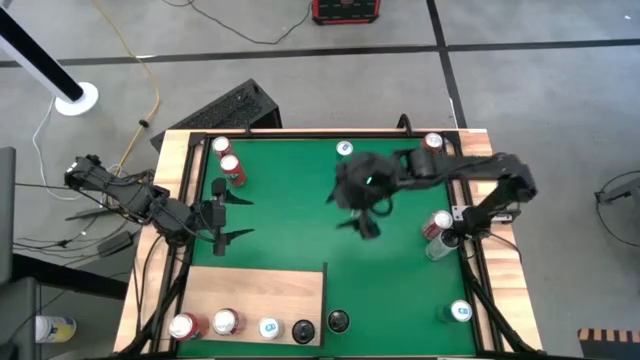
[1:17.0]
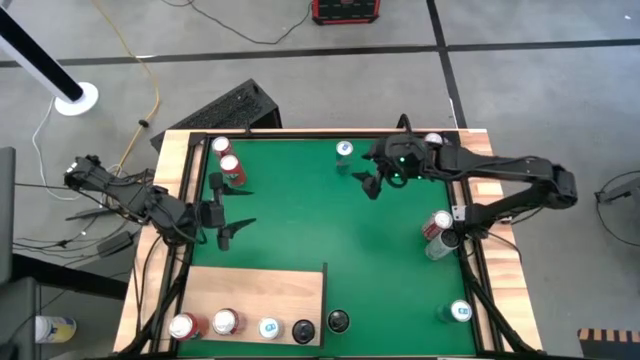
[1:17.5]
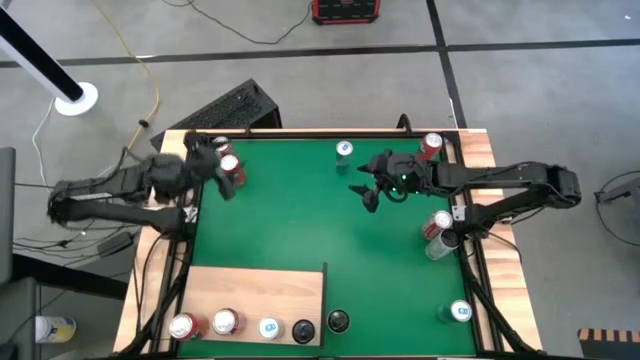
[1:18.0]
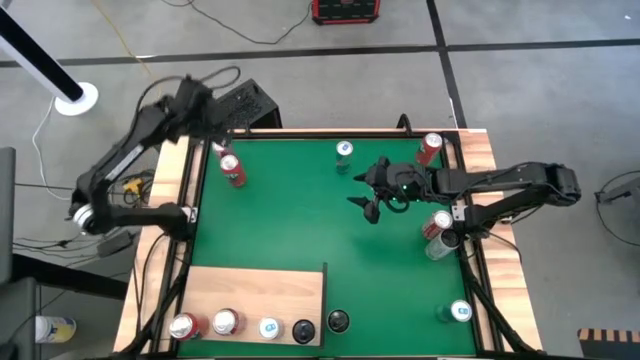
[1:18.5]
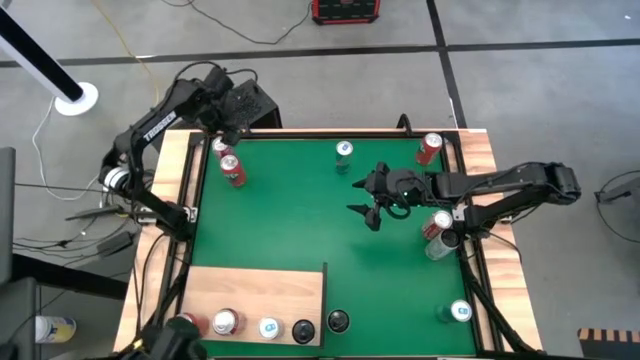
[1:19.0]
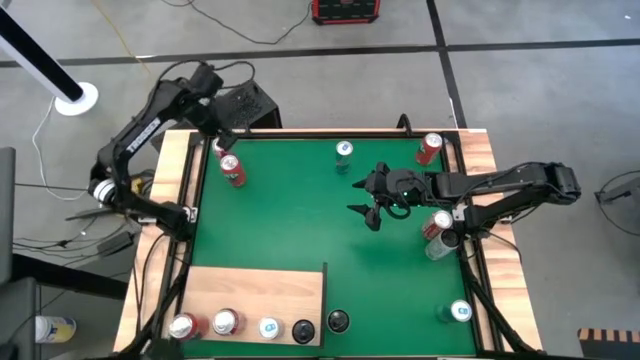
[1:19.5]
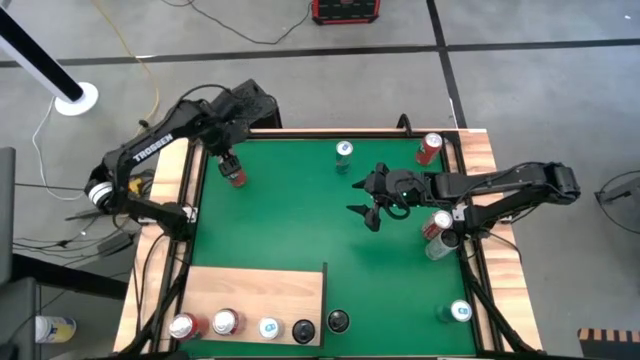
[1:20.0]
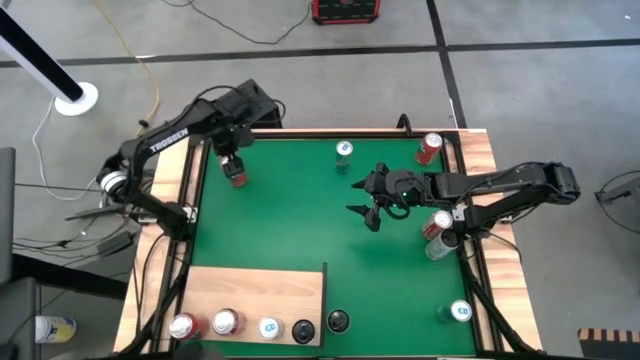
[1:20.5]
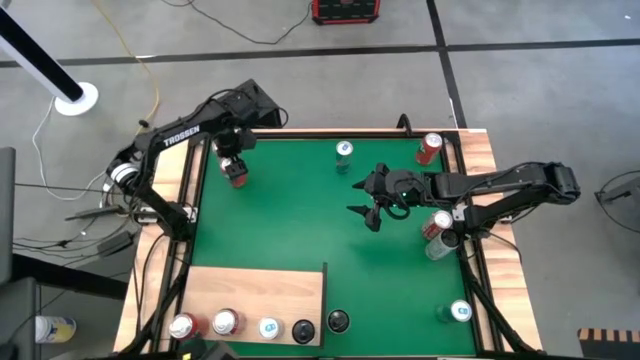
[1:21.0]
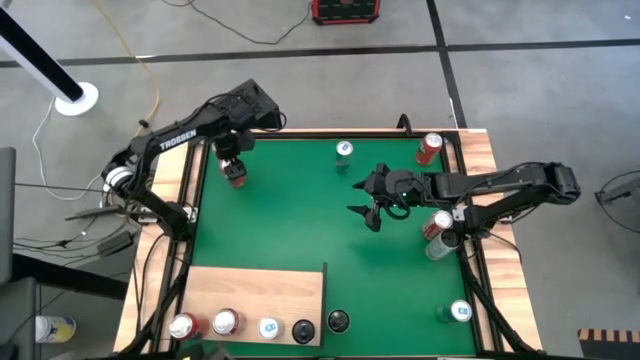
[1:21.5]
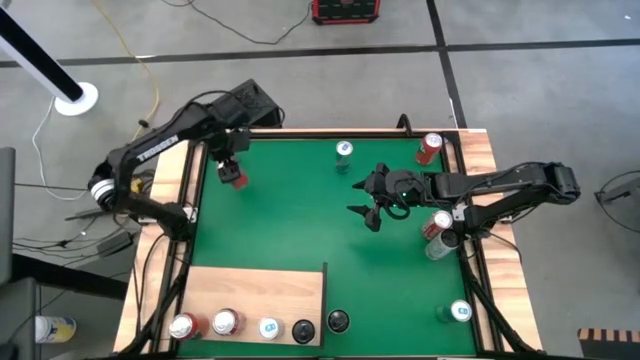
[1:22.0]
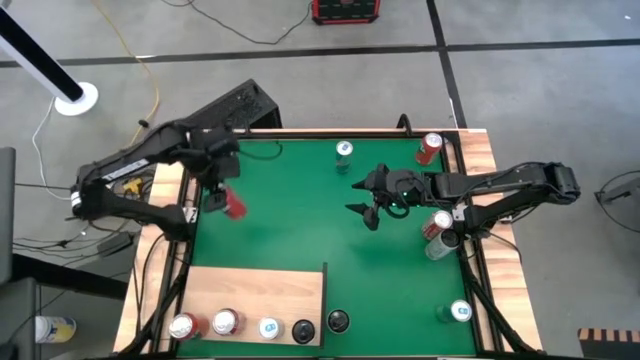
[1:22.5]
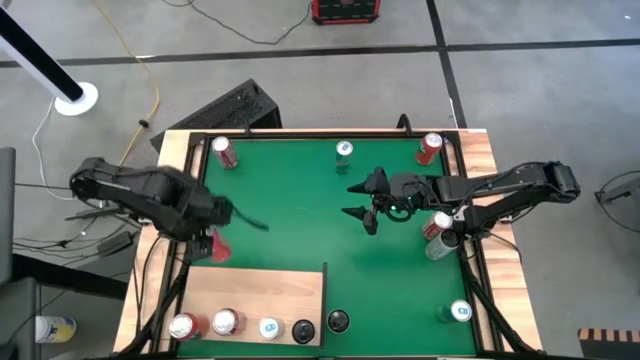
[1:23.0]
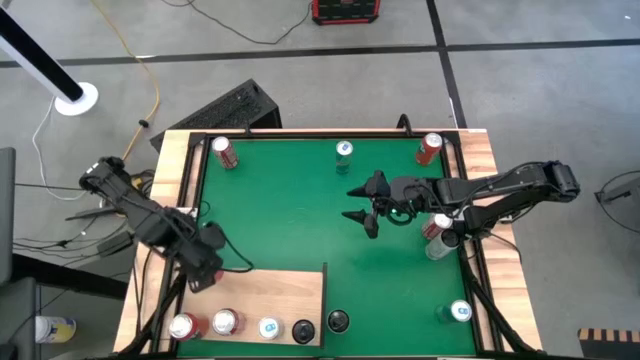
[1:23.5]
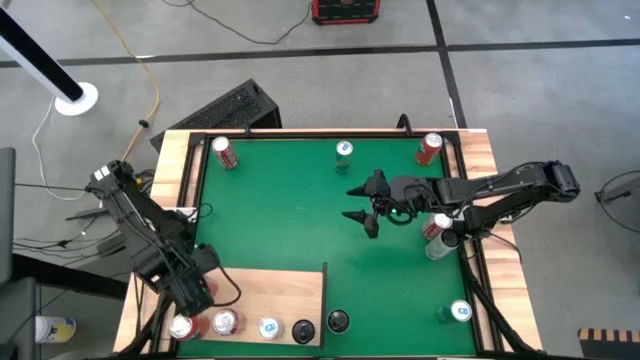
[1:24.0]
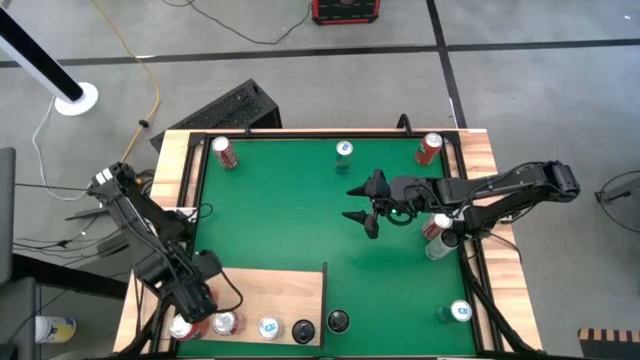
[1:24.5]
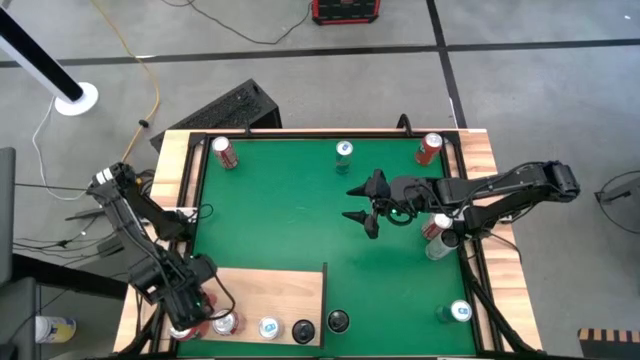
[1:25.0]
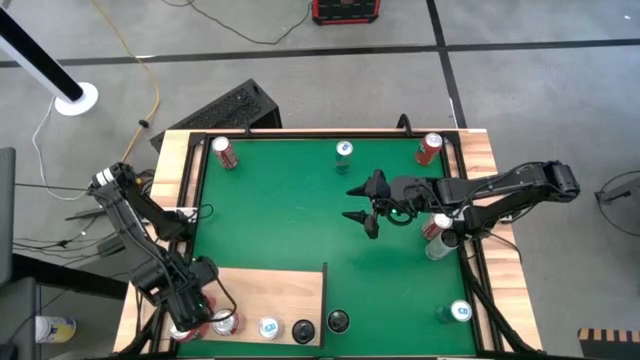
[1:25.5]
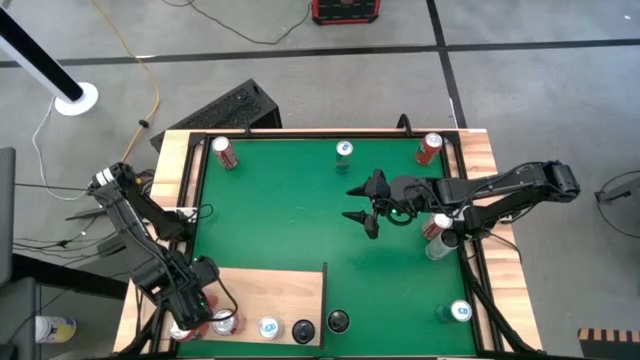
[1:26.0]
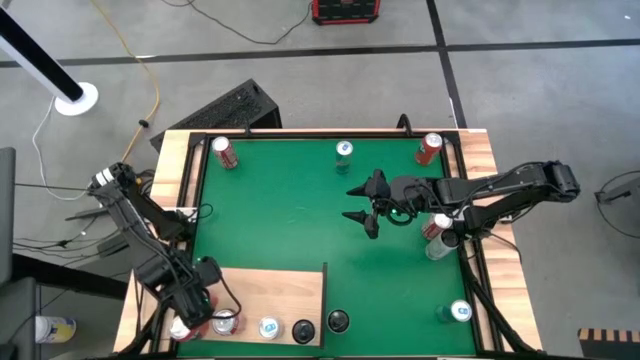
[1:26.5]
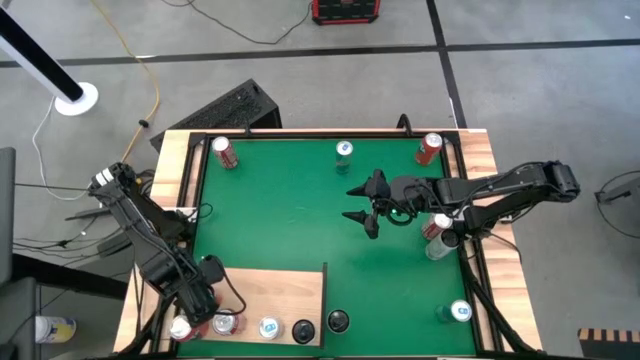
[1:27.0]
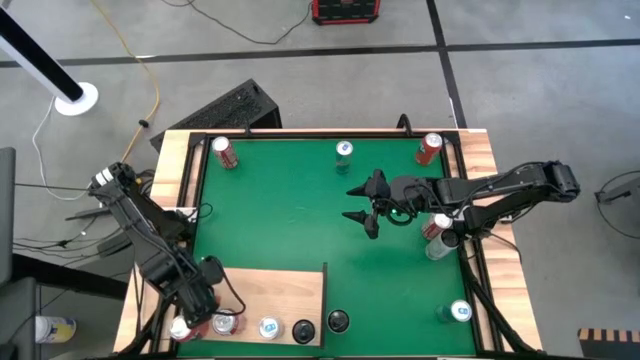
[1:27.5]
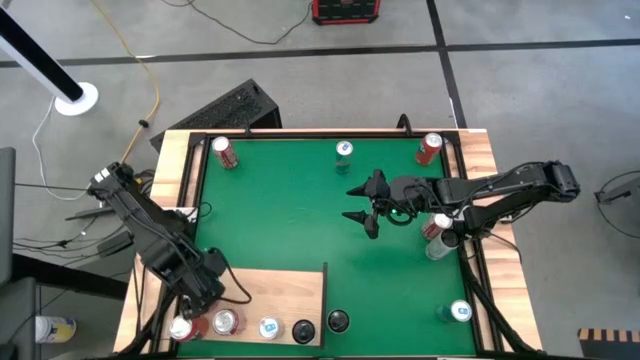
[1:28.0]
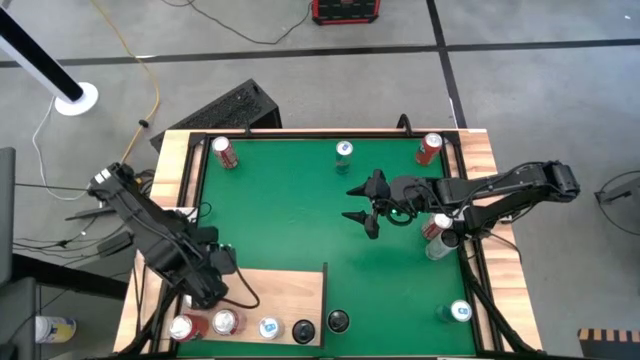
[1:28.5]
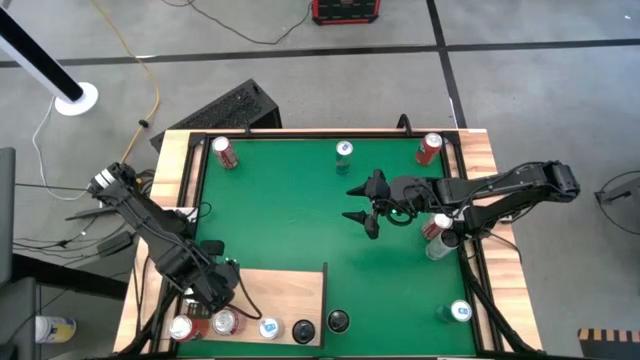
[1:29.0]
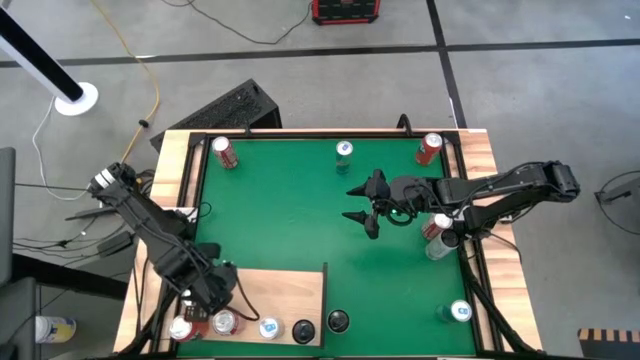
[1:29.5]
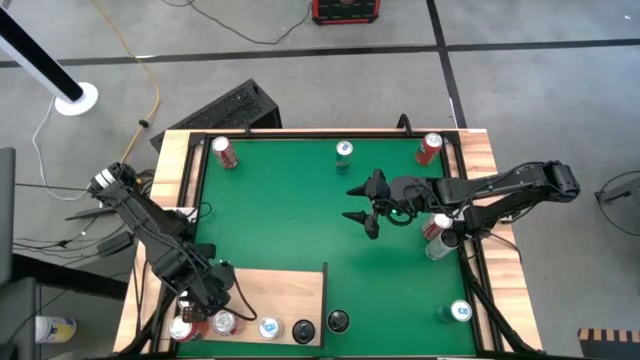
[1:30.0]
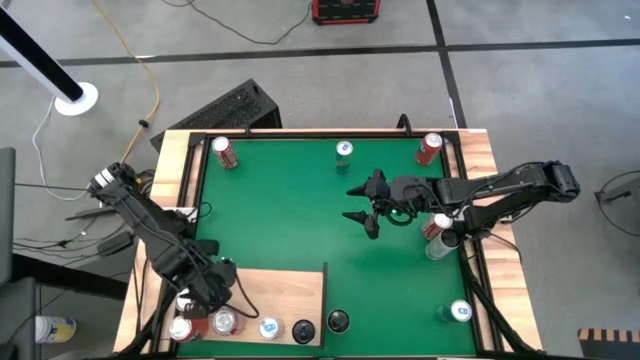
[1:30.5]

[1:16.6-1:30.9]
Task: Place canned beverage on shelf
Put the left orange soda can on the shelf aligned with the other orange soda can

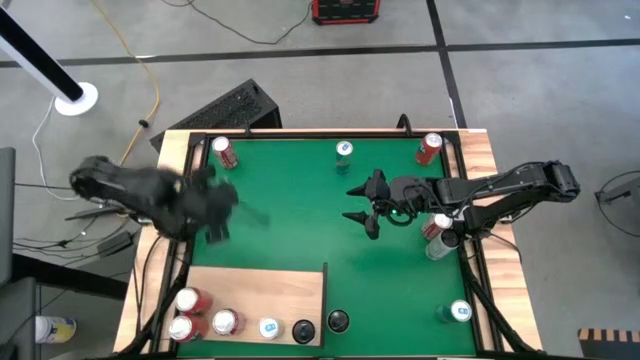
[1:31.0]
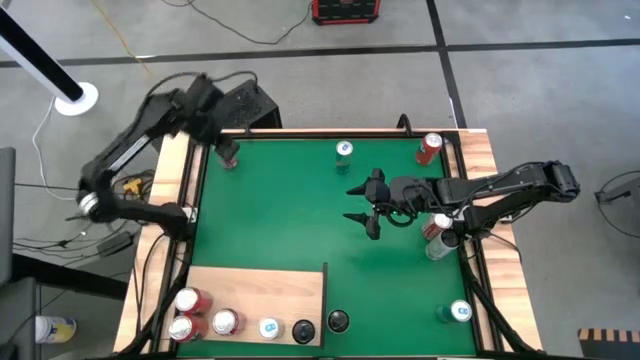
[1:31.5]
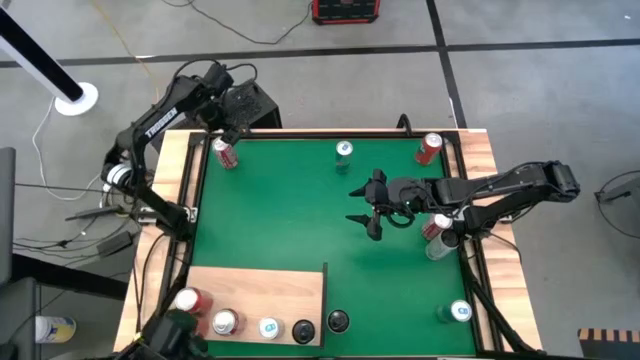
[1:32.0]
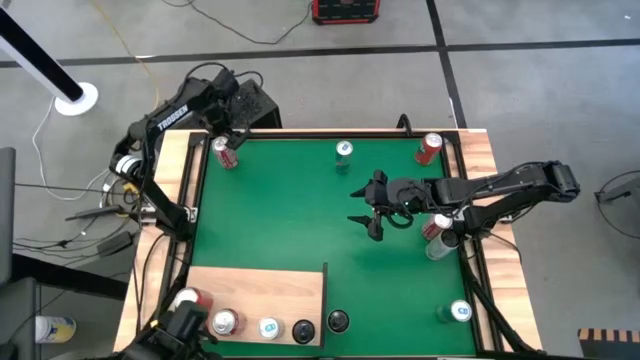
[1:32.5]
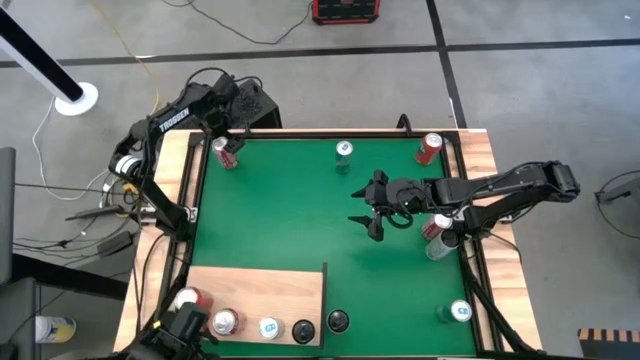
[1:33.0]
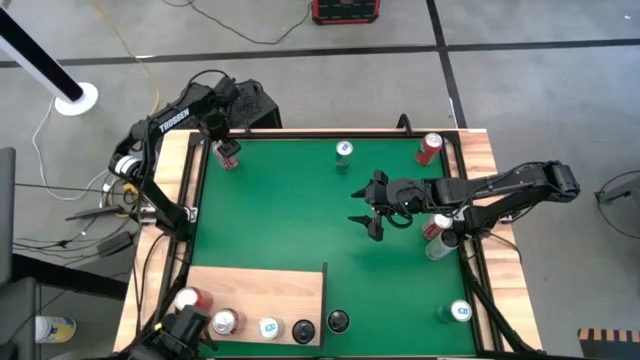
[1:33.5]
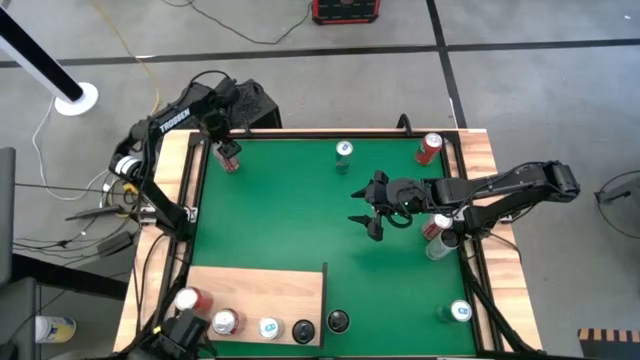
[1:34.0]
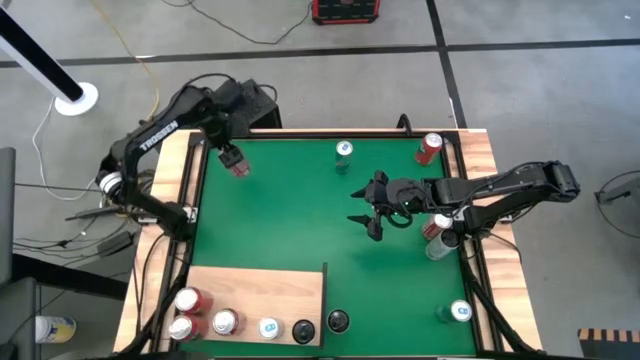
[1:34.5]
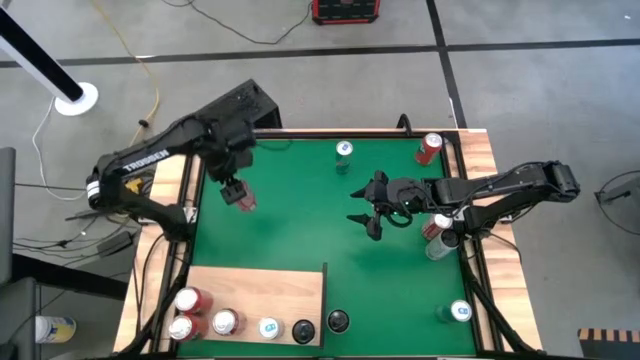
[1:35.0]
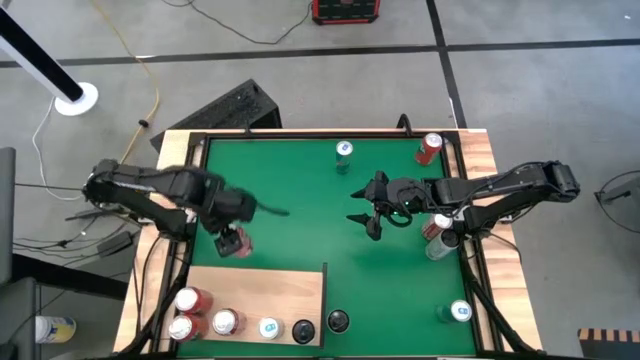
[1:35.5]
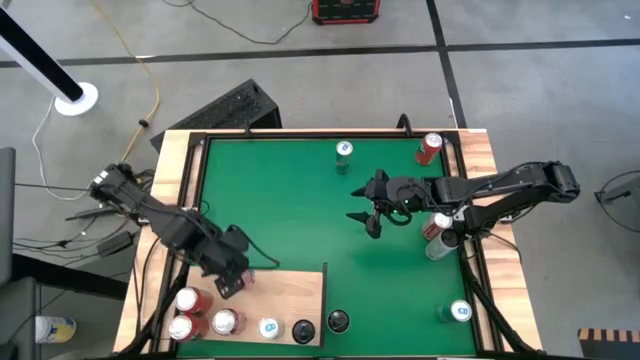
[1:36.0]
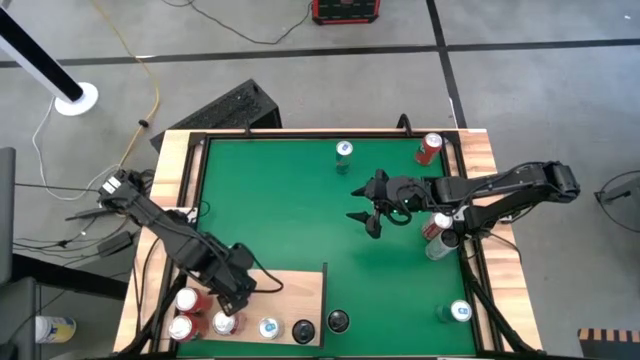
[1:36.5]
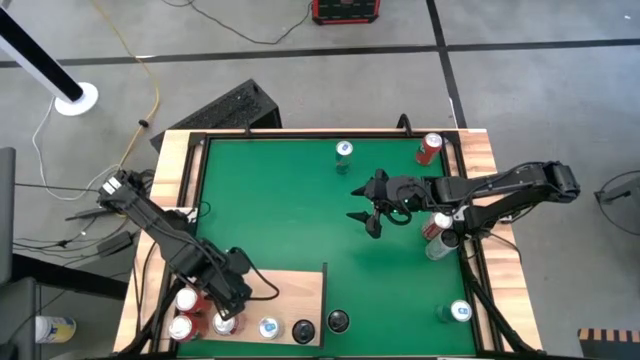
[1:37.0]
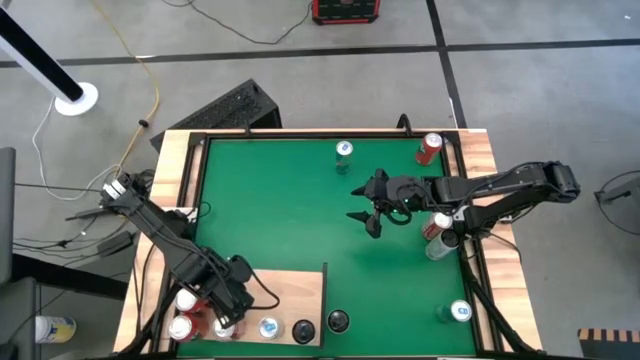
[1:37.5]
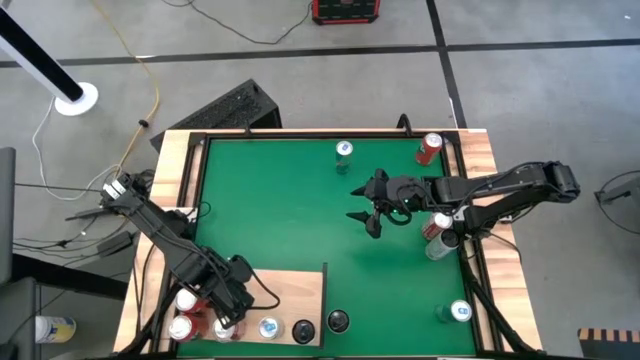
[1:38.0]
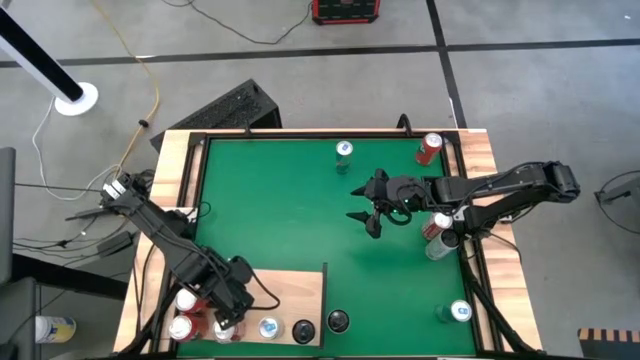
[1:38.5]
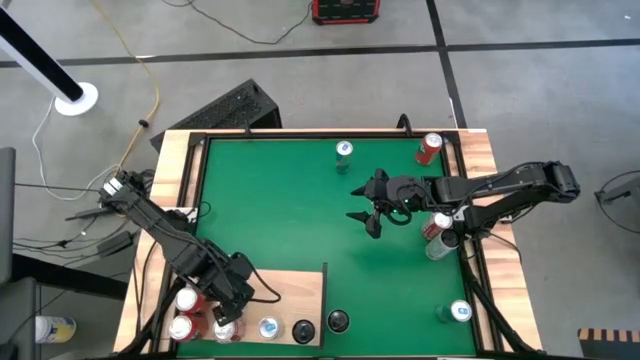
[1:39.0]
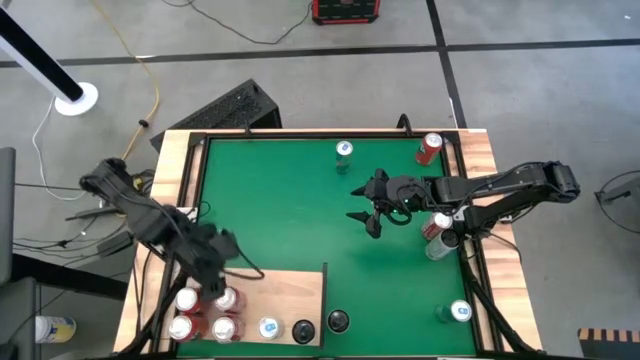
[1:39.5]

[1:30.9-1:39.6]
Put the left red soda can on the shelf aligned with the other red soda can
